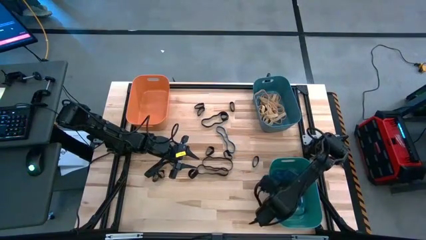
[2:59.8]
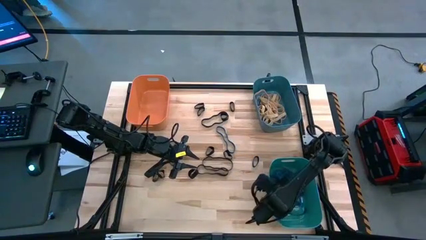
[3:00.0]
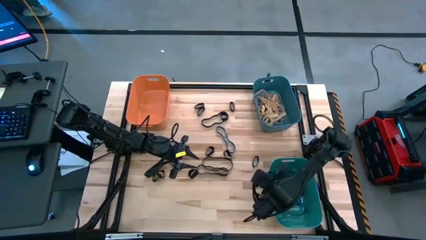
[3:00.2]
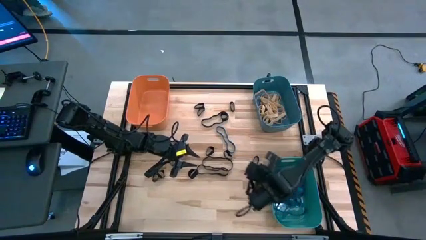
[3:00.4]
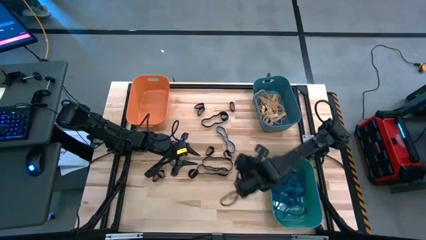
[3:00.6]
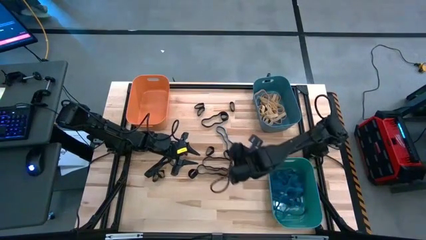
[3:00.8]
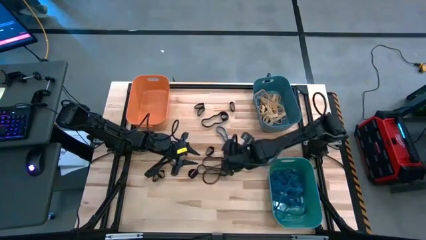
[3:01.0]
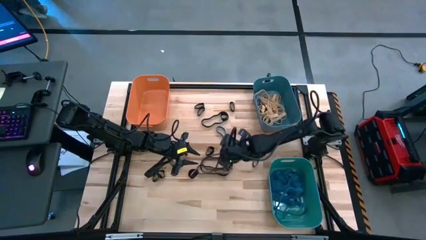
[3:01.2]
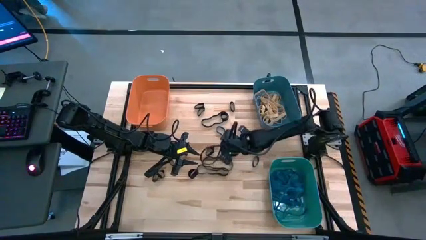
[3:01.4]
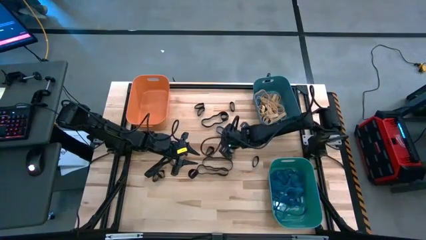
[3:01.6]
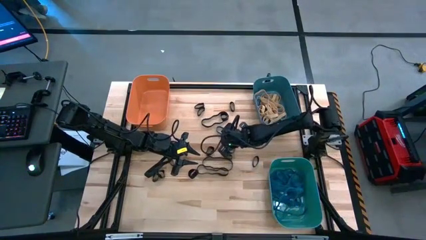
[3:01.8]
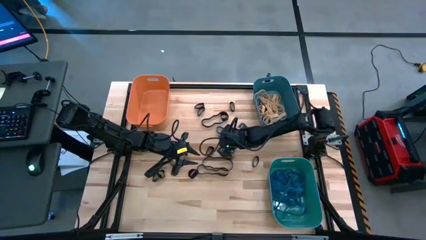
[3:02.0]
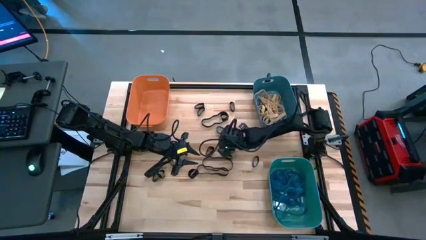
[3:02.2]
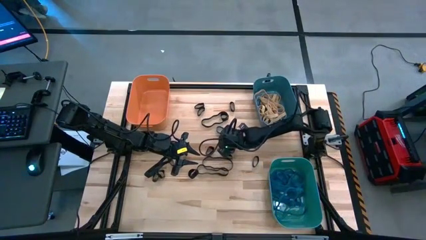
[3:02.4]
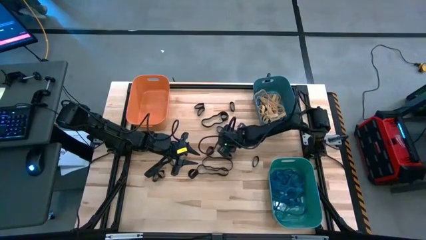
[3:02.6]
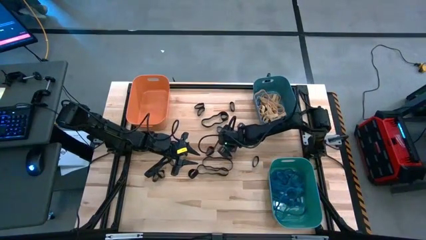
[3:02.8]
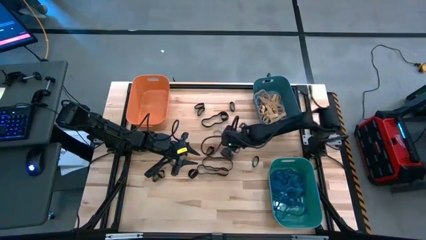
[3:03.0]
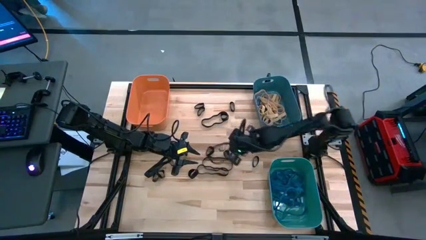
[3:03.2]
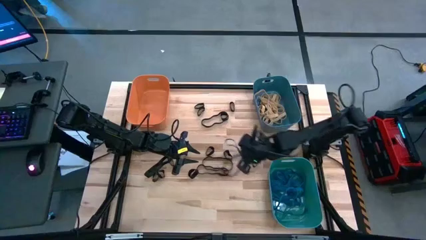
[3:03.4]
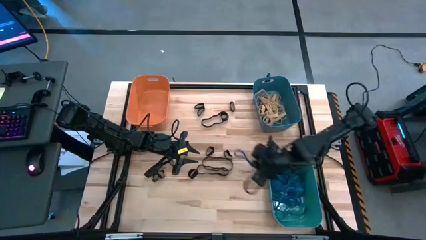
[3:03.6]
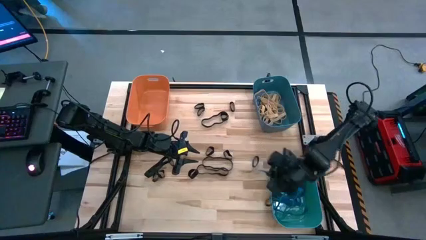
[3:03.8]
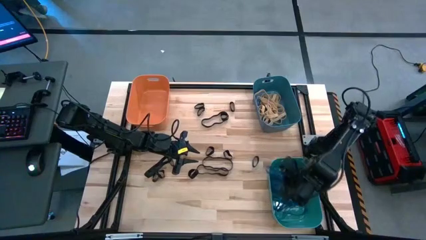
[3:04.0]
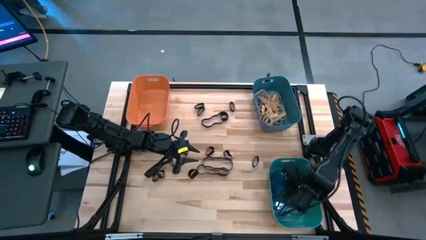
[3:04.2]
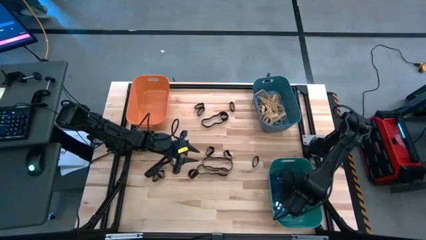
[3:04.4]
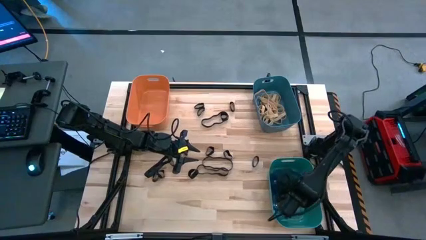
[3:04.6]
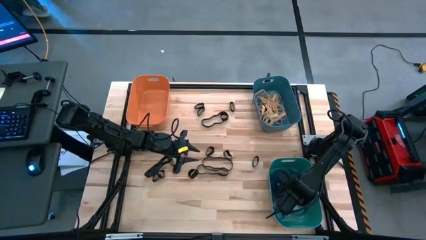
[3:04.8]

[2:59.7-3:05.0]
Task: Sort rubber bands into baskets
Put the blue rubber band into the green bin

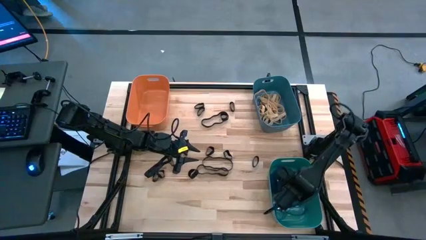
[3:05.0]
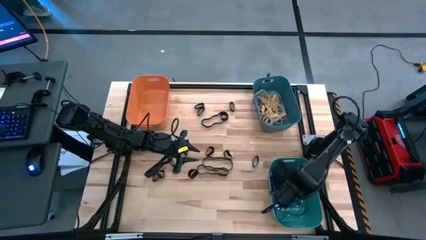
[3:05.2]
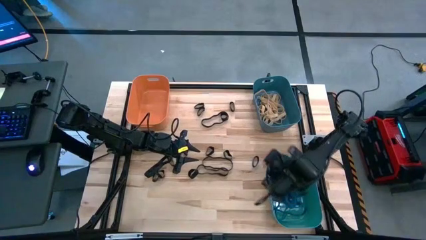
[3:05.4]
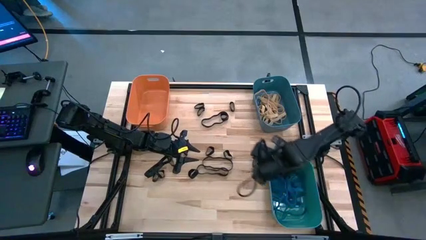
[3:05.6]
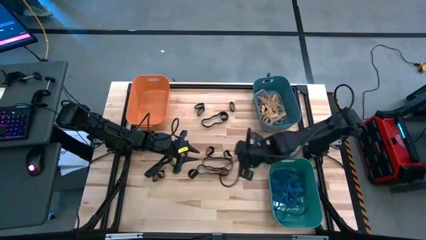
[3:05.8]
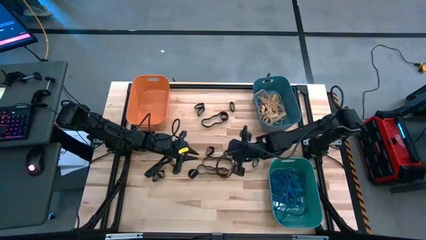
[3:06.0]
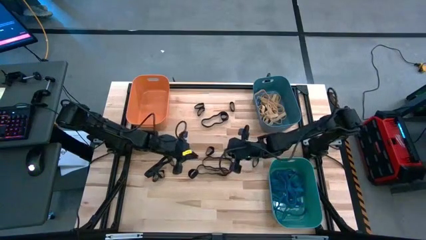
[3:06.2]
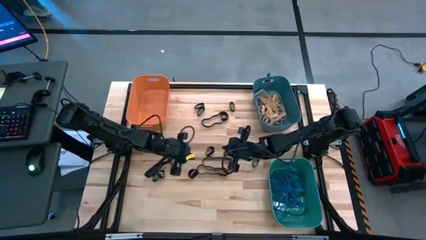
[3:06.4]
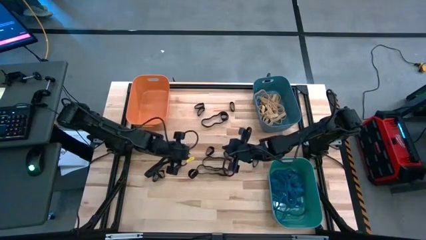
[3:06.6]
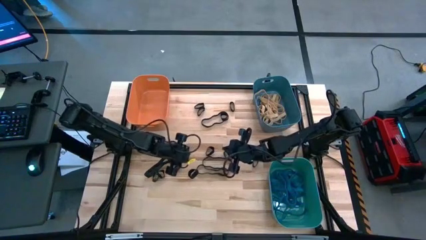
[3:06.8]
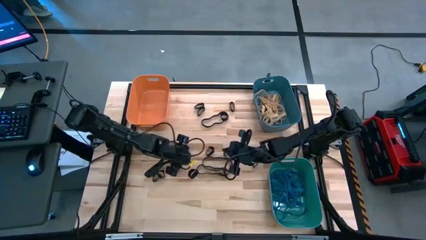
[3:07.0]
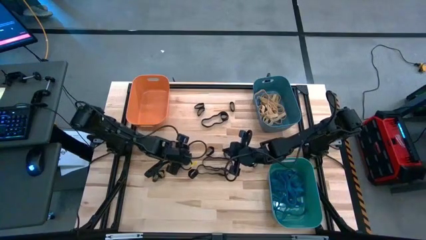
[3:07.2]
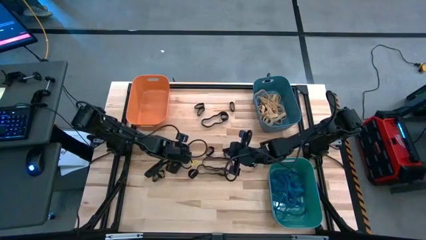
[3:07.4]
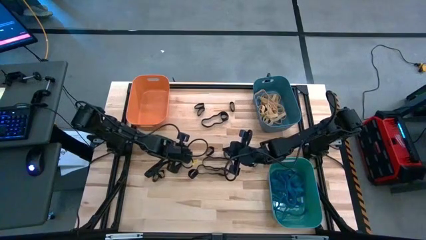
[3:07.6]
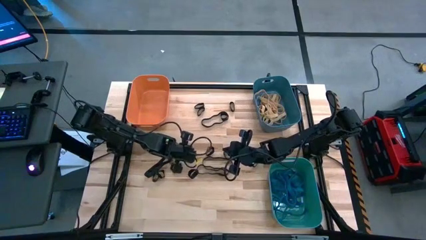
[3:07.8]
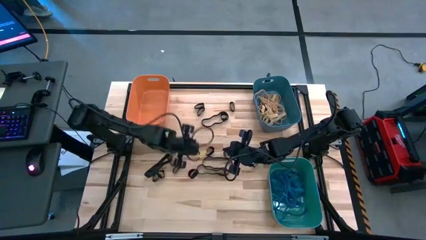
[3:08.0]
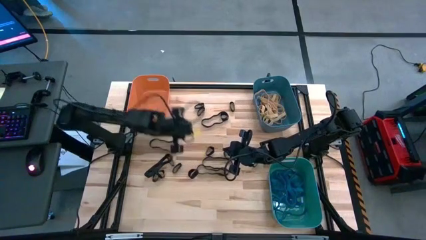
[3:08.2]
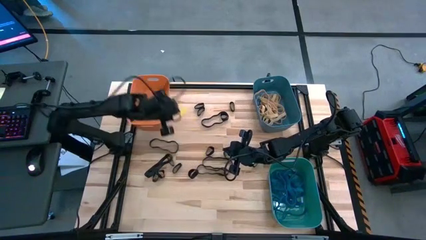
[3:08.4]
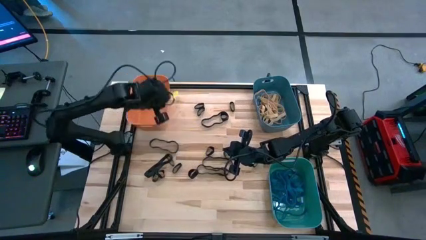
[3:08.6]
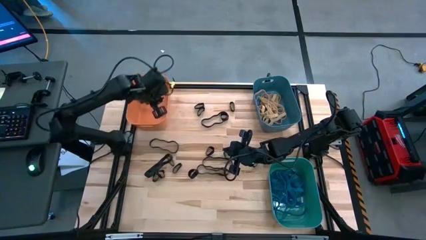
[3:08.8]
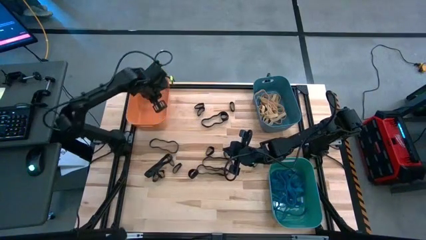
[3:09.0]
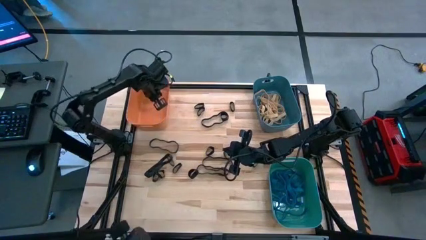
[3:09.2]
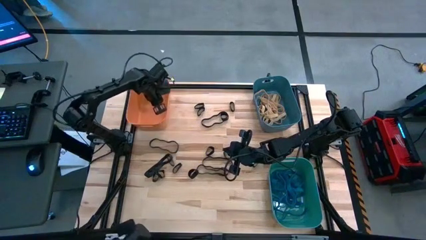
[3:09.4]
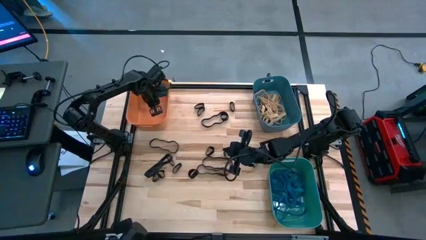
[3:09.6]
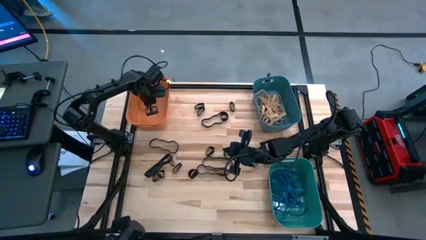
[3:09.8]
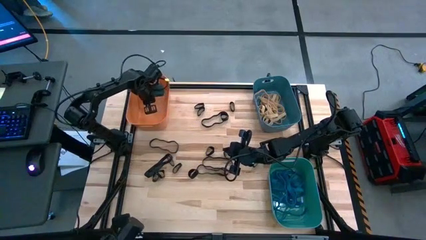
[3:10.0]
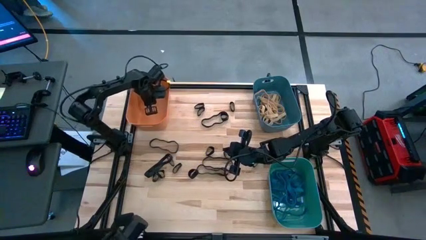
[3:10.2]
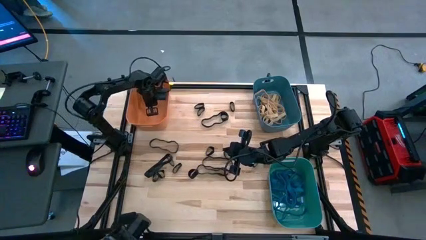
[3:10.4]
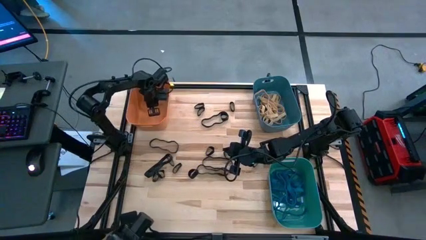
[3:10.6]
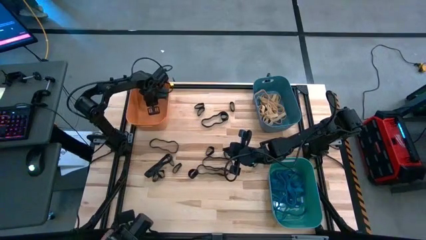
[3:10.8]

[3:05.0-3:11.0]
Put the black rubber band into the orange bin

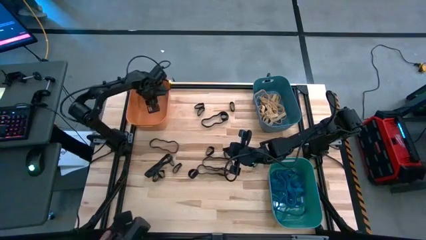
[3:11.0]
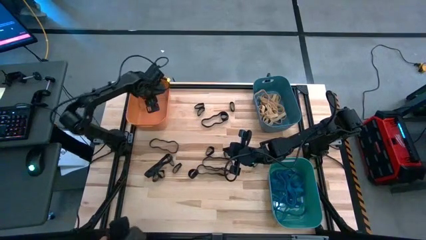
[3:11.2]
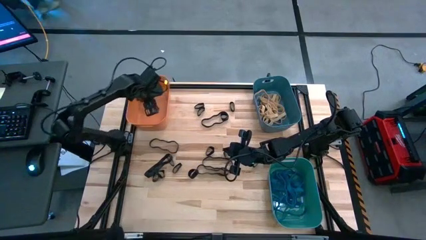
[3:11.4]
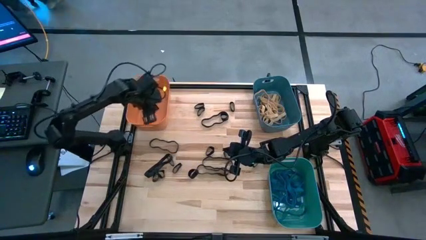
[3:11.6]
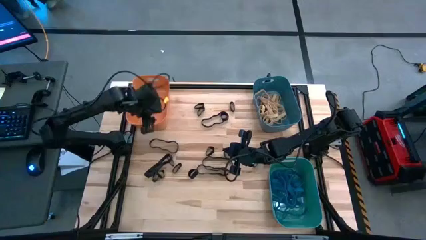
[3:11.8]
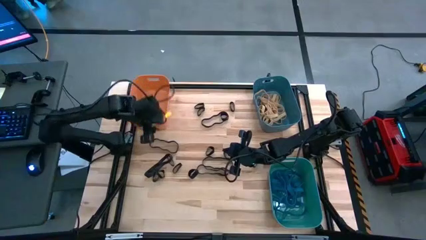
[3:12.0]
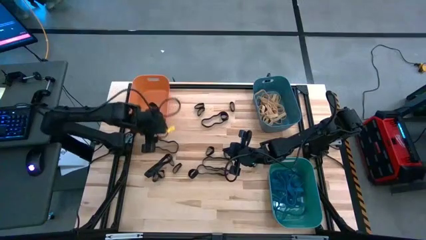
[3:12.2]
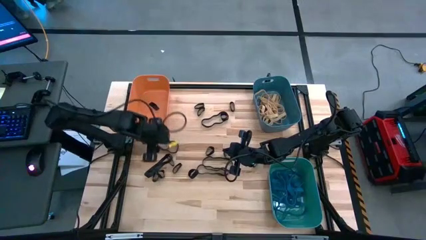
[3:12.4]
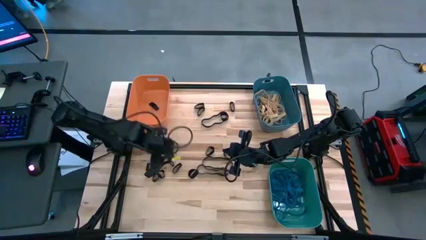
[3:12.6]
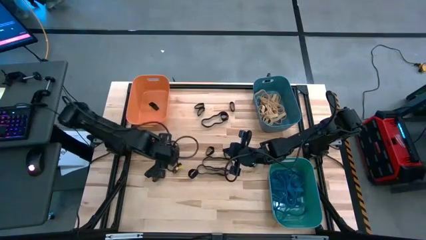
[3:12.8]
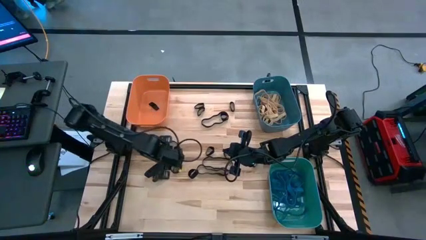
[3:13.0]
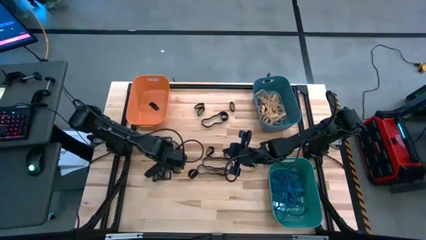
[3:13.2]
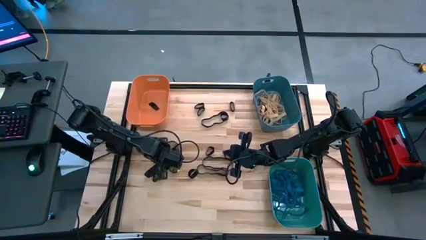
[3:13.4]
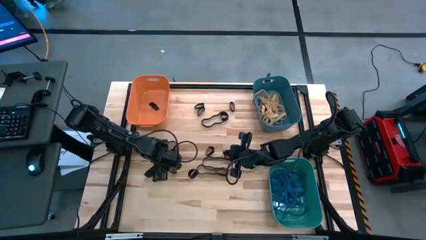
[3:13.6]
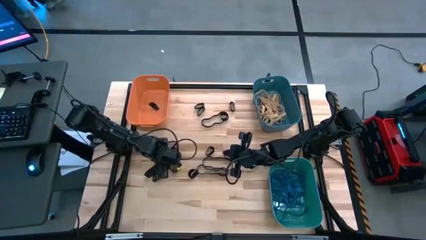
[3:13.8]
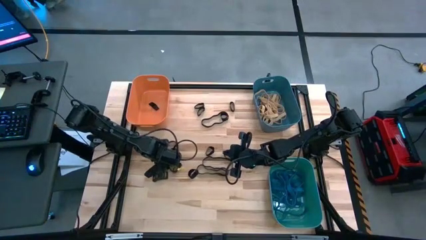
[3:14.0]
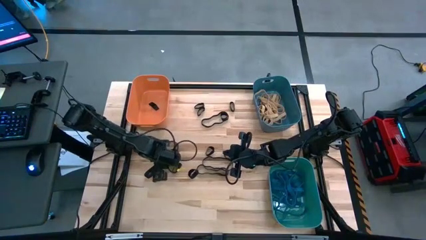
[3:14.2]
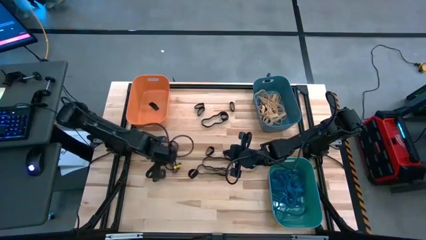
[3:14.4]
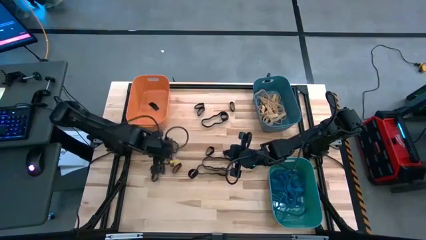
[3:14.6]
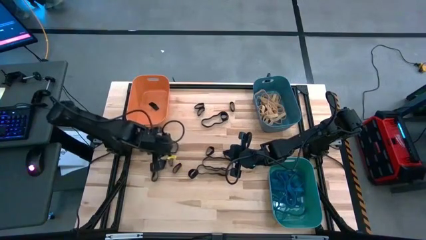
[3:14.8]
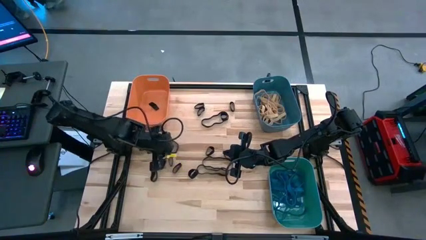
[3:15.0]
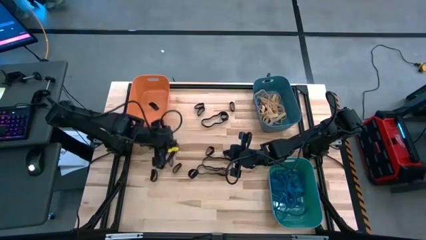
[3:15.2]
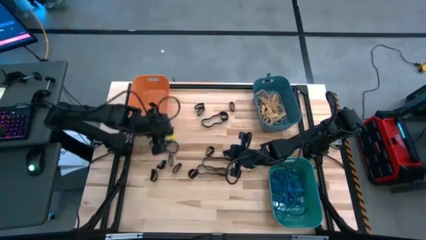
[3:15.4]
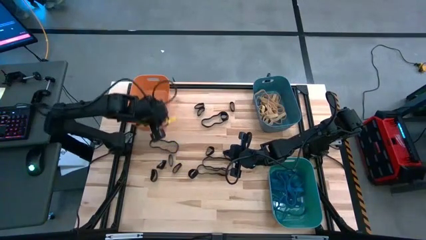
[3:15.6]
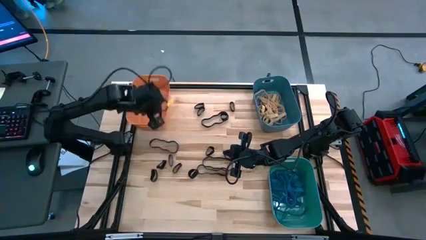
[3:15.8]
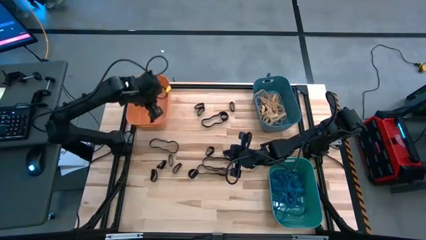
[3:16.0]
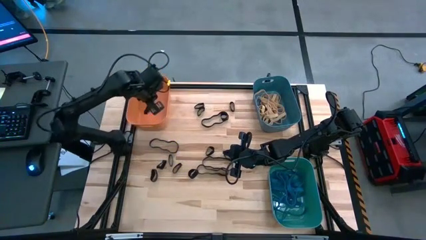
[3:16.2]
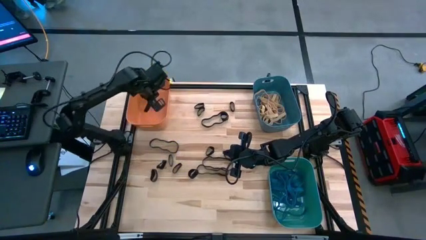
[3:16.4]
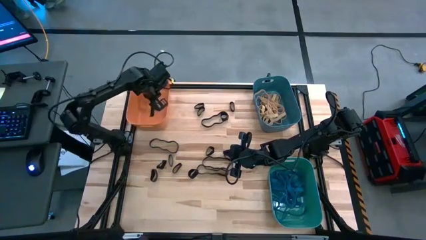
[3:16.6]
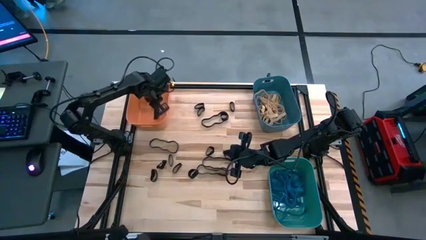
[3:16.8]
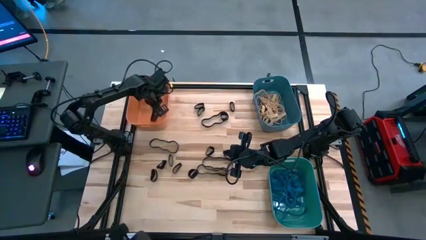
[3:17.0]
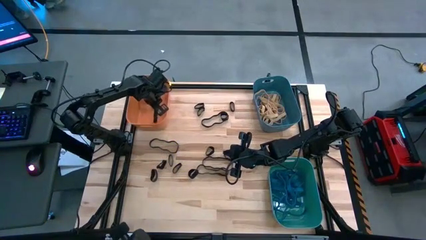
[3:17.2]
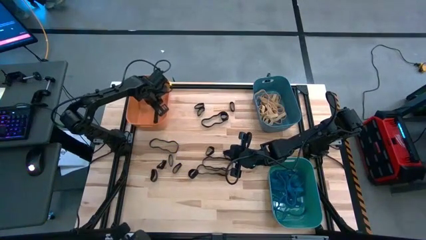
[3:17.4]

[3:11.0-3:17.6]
Put the black rubber band into the orange bin
